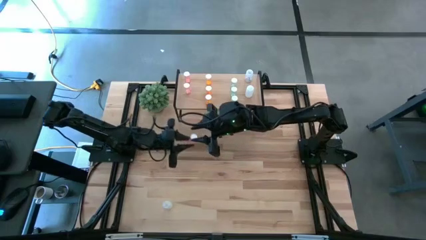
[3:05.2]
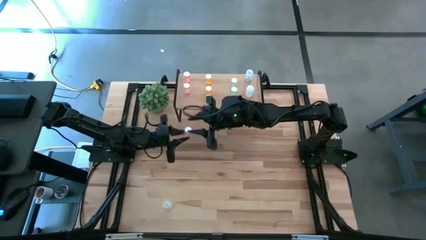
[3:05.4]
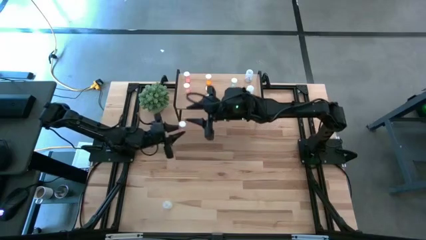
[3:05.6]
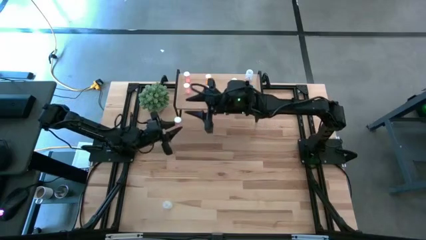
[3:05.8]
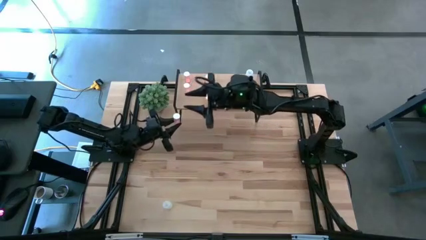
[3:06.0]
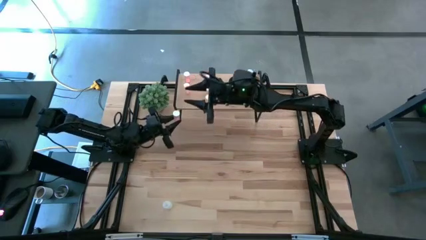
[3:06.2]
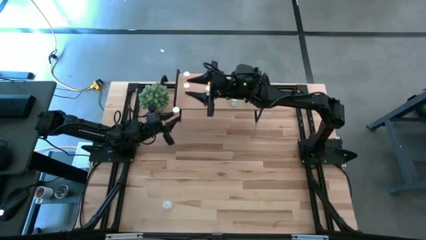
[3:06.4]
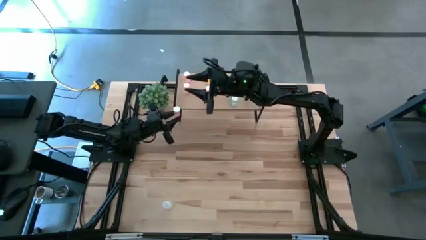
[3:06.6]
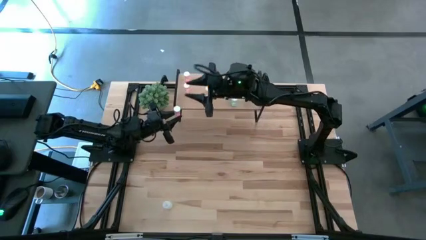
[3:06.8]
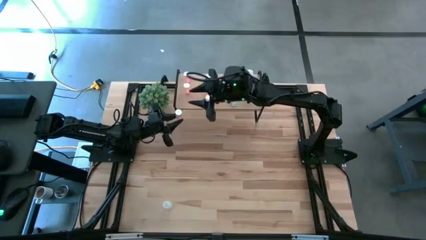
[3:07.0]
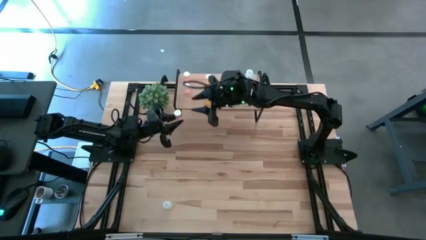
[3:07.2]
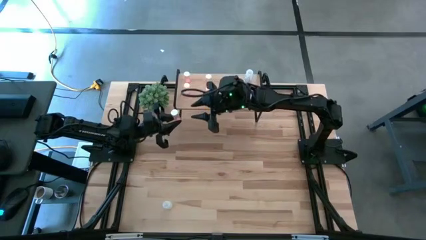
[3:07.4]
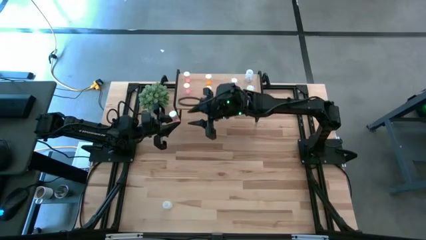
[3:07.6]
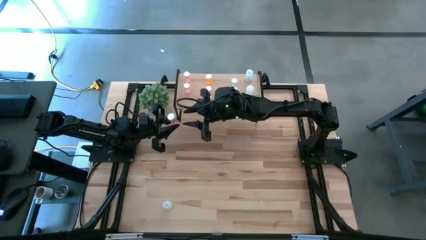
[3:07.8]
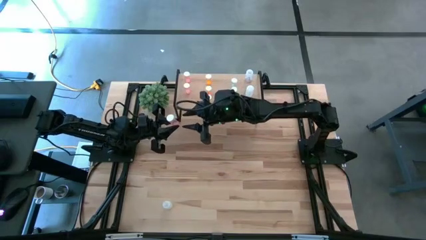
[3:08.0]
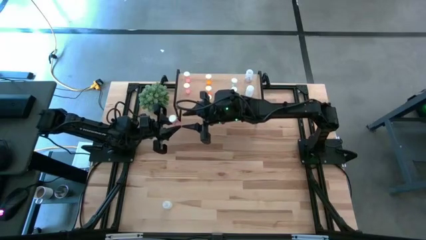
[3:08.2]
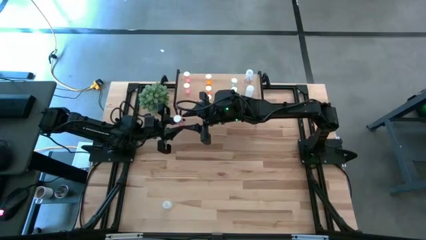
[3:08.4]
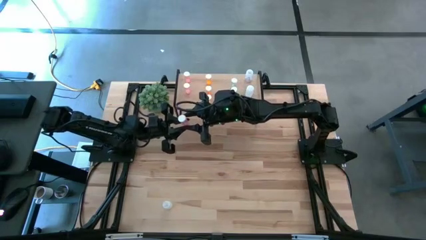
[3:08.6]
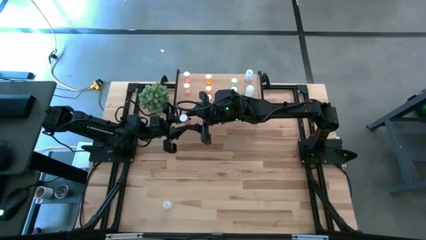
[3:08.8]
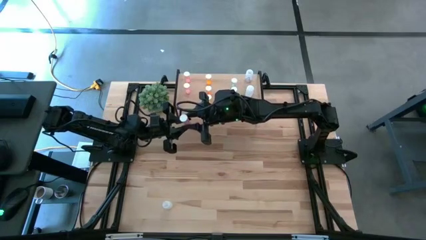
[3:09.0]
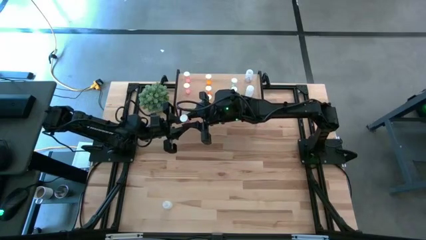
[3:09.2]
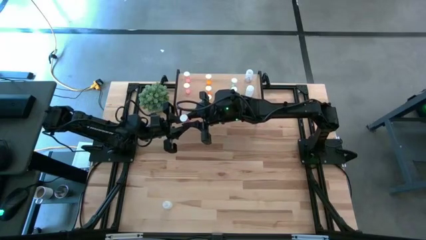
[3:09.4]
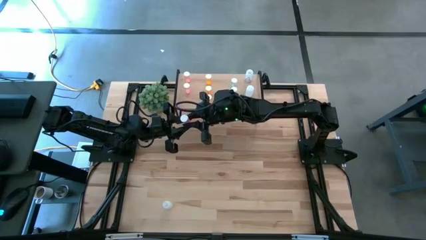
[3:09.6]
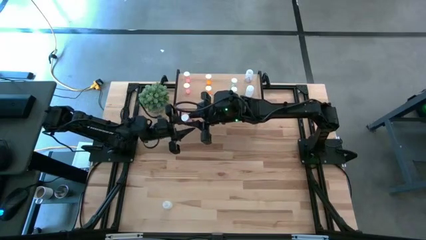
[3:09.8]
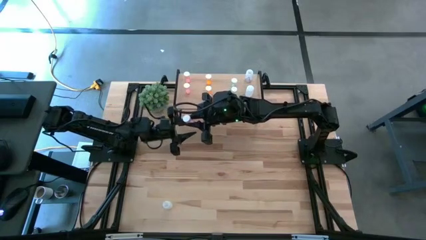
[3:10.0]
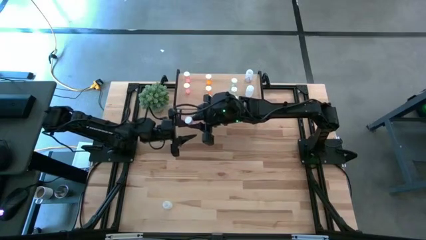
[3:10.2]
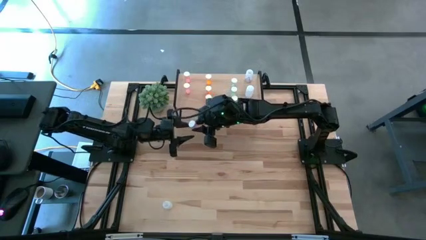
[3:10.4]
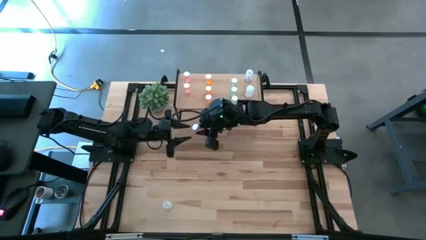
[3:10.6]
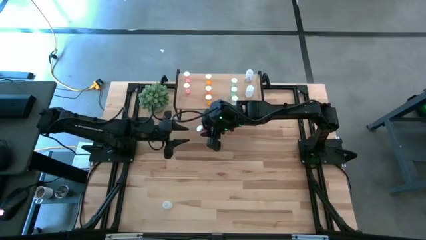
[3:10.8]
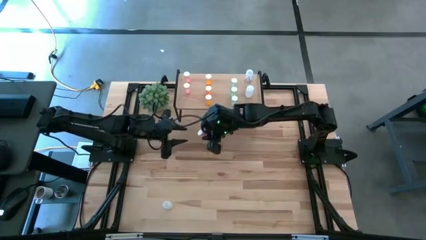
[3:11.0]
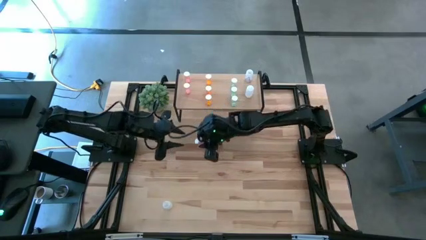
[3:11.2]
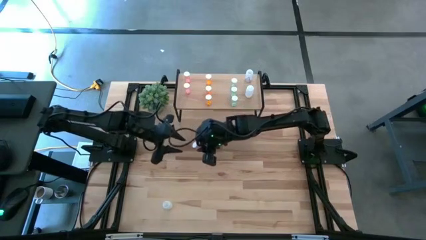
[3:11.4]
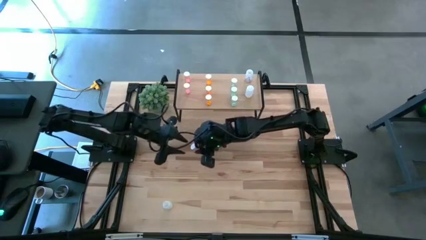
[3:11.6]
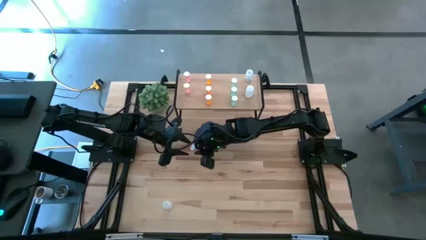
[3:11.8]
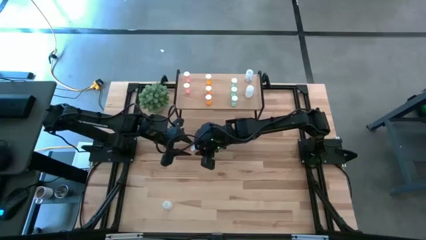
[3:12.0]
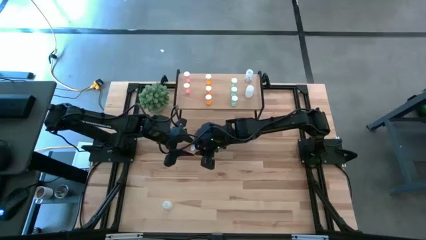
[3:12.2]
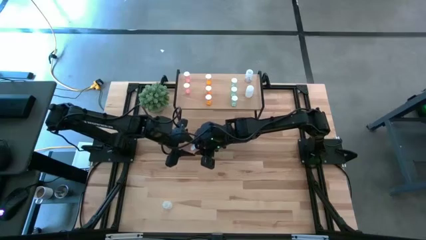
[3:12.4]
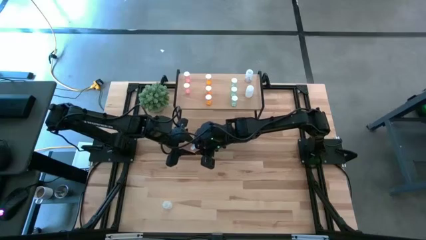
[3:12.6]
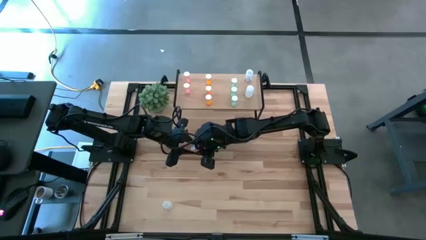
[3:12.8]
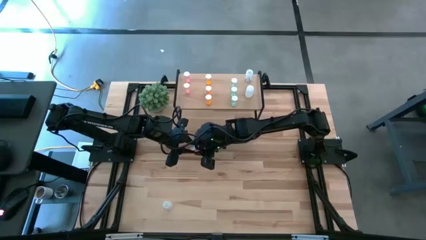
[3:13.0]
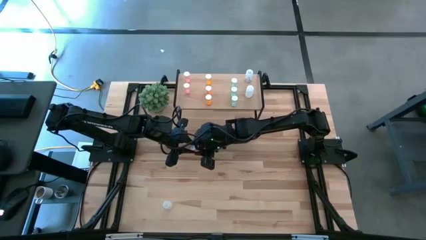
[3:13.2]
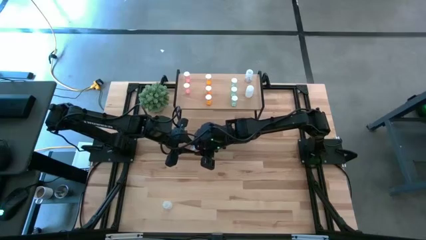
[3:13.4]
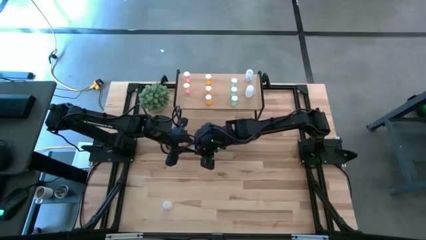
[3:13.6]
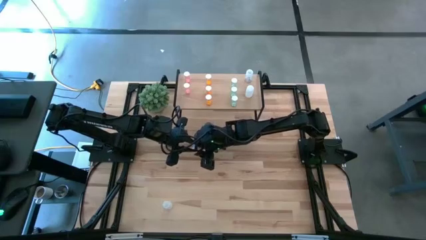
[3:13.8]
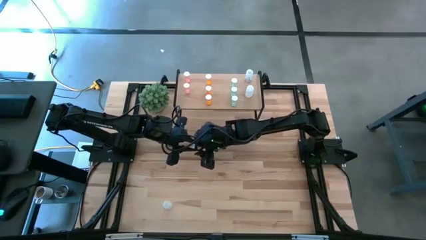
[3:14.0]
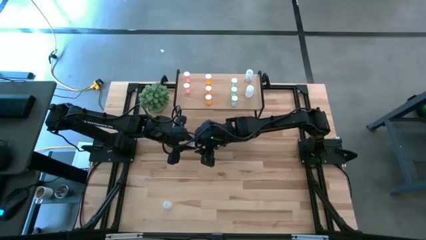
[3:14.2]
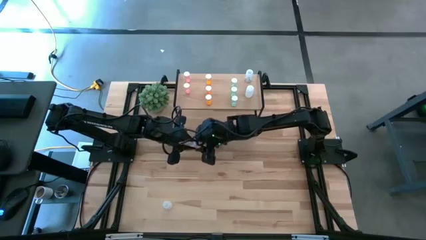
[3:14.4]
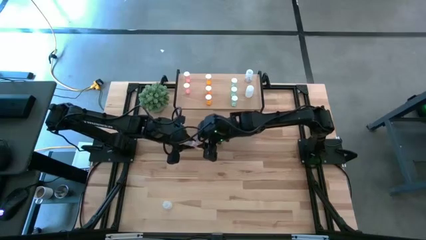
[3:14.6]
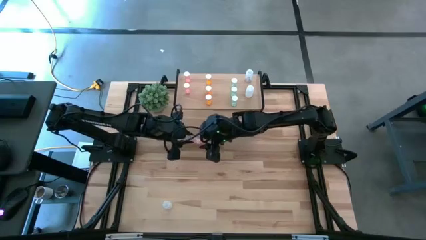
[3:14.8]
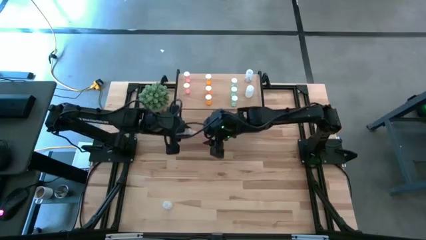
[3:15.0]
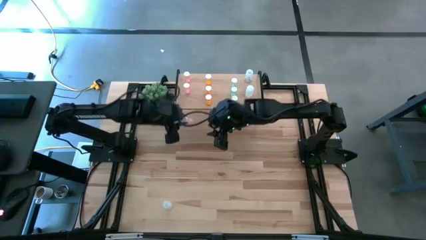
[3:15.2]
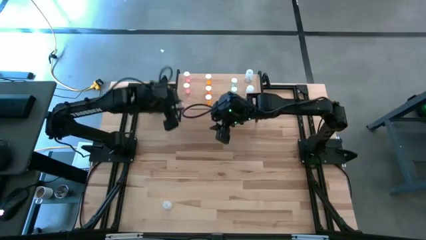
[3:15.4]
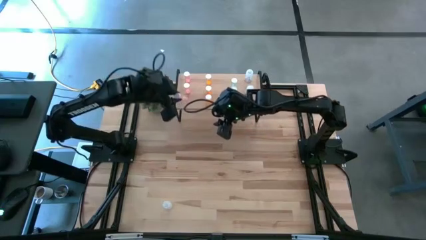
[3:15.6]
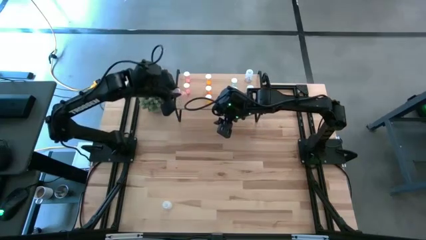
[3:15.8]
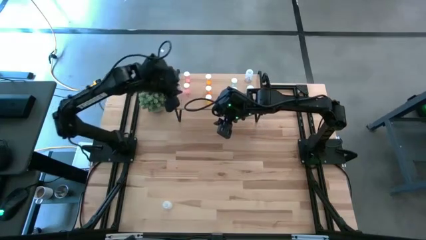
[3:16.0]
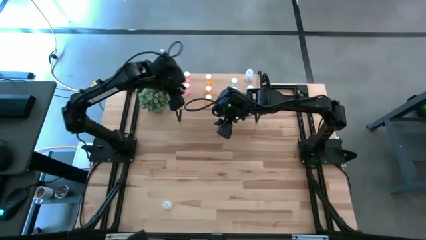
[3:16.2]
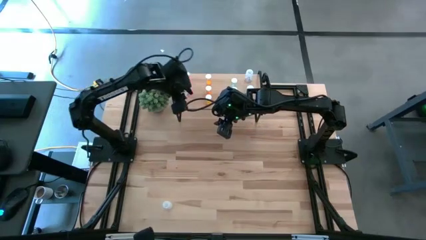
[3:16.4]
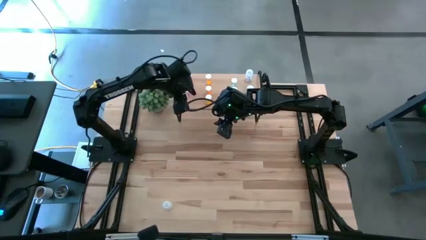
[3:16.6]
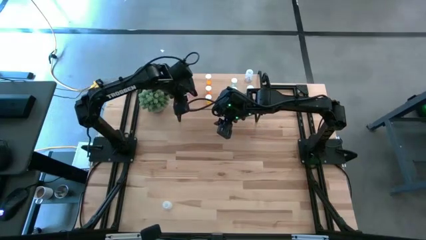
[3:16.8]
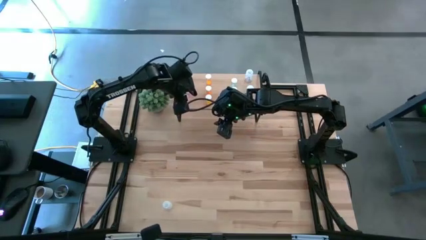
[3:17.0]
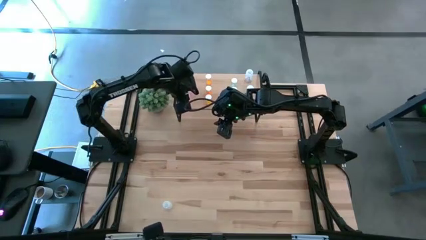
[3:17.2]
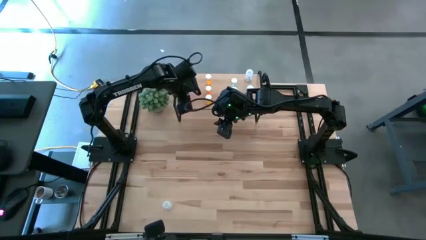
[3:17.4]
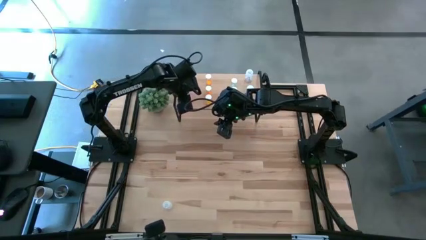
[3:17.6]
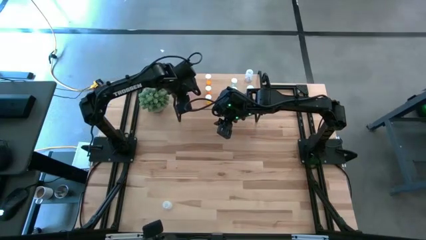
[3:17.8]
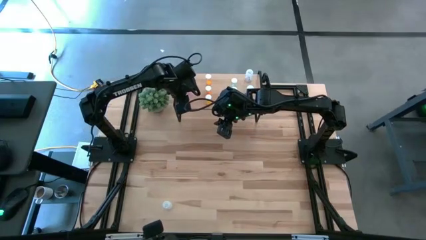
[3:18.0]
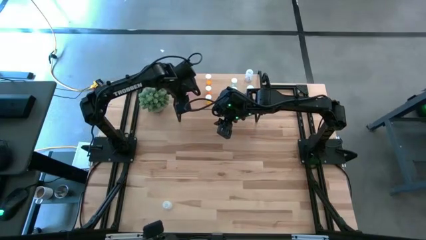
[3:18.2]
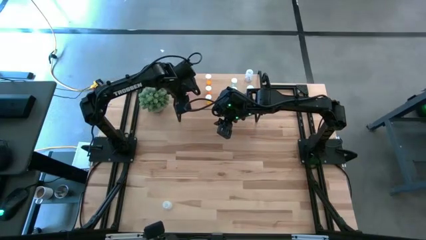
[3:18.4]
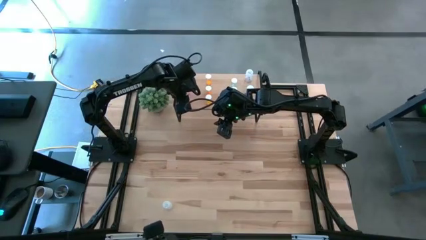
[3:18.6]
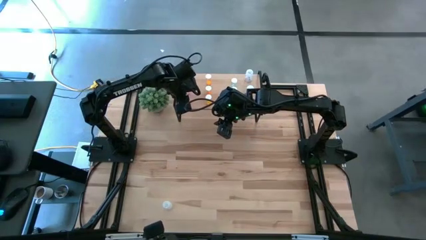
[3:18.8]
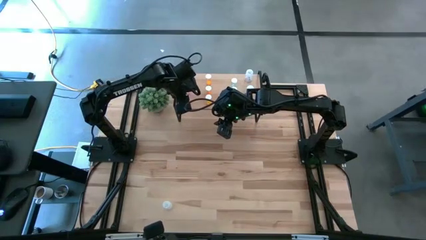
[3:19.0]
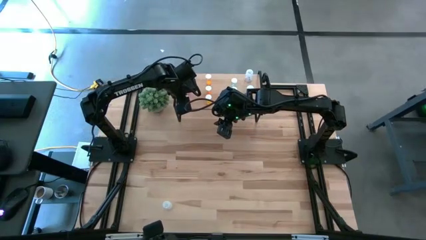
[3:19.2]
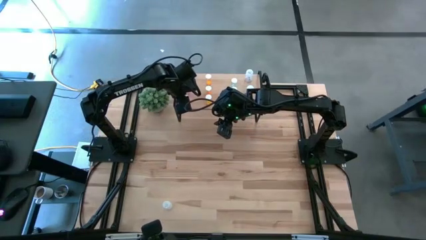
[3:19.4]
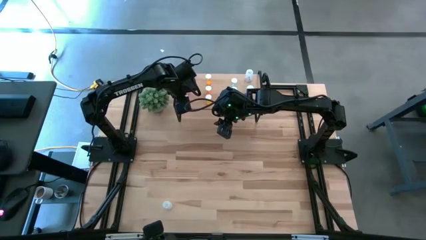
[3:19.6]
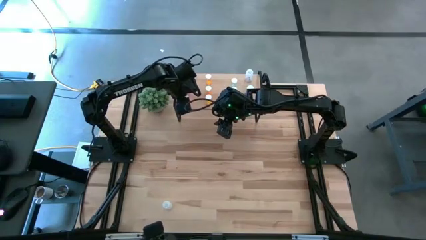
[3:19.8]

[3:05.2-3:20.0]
Task: Pick and place medicine bottles onto shelf by color
Put the pink pill bottle on the shelf aligned with the other pink pill bottles

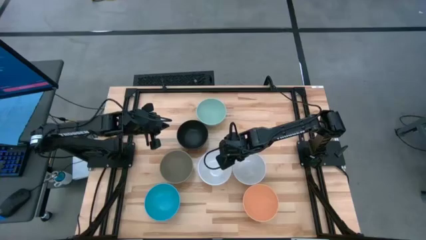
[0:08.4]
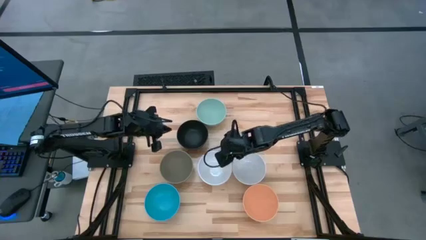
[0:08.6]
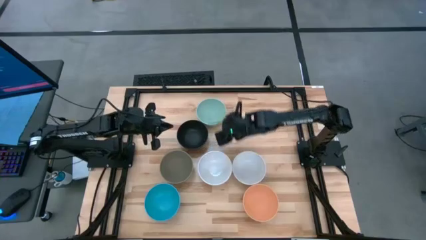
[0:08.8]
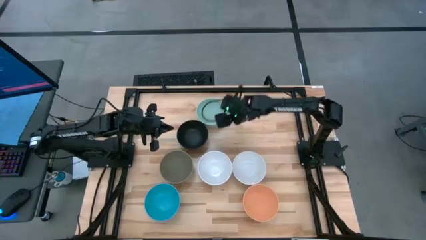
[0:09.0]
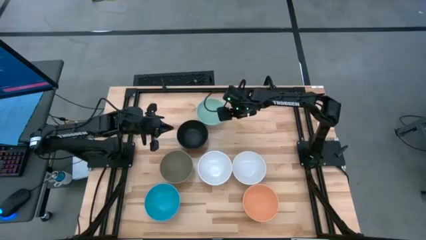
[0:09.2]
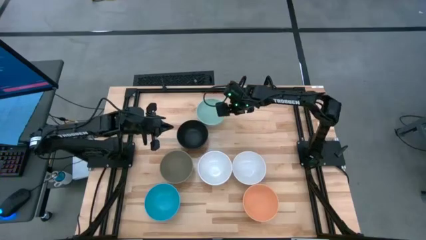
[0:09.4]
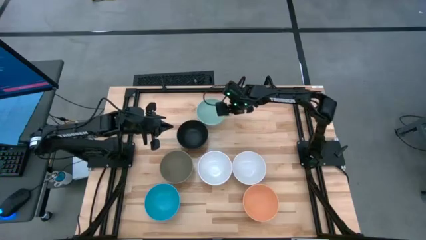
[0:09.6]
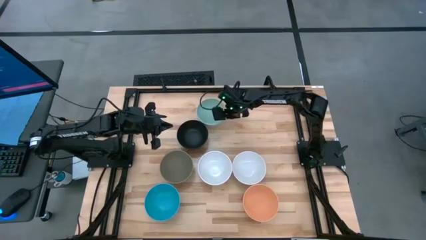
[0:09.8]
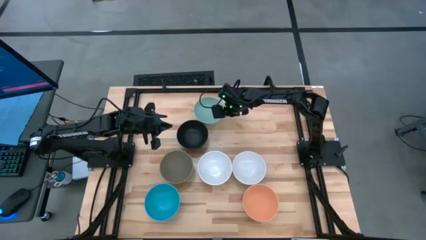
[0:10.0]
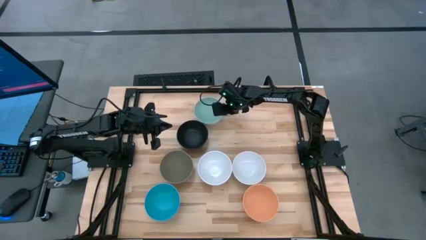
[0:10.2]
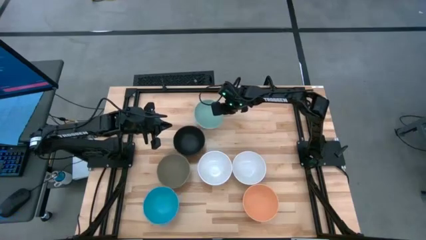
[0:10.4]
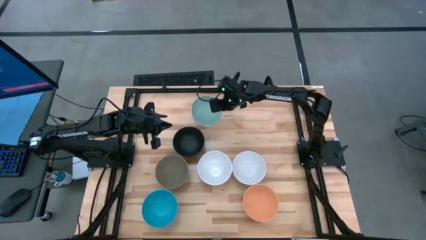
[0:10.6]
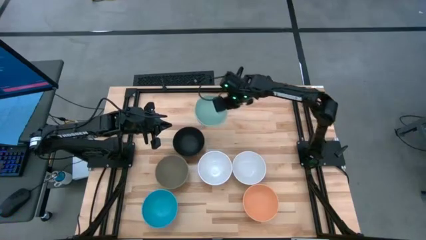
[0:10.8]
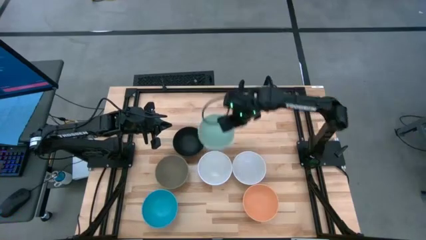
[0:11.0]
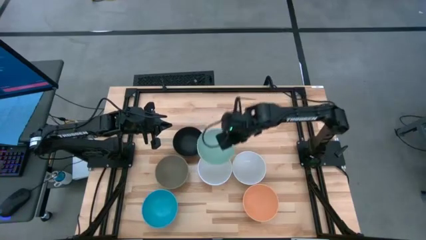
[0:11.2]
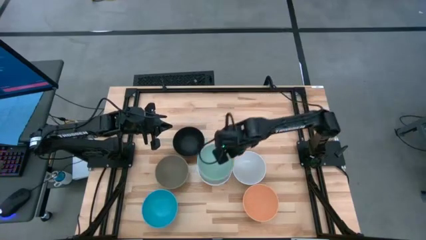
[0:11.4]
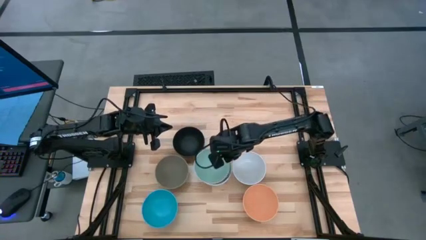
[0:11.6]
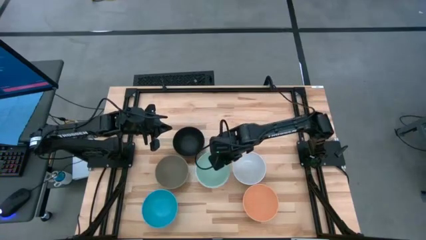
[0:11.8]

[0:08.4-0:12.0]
Task: Nest bowls inside each other
Stack the light blue bowl on top of the left white bowl
